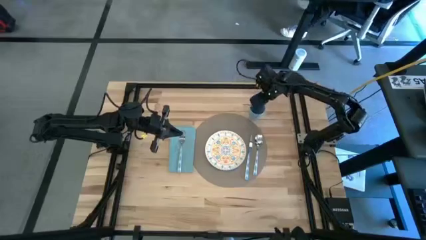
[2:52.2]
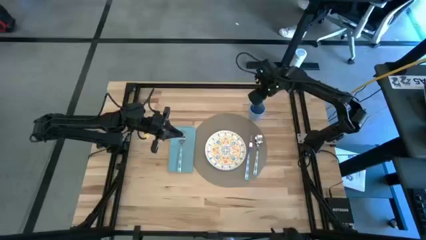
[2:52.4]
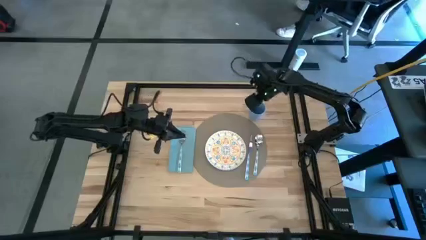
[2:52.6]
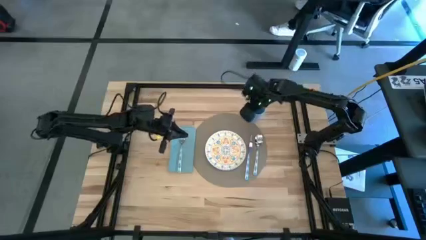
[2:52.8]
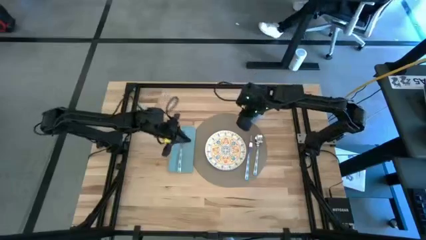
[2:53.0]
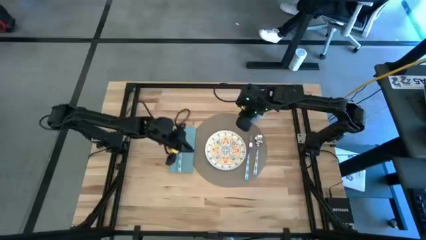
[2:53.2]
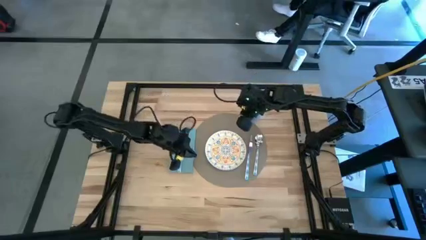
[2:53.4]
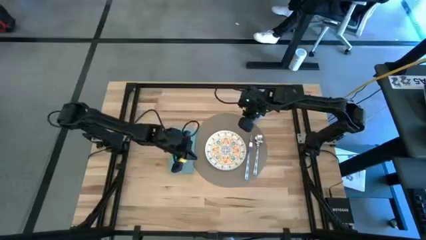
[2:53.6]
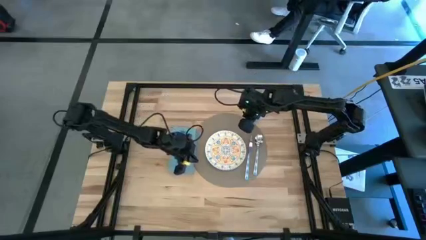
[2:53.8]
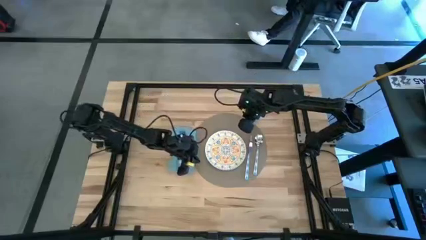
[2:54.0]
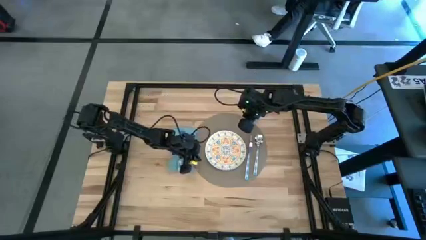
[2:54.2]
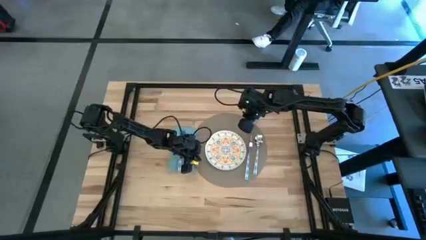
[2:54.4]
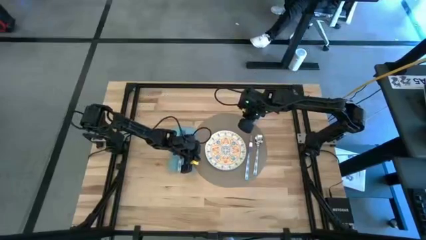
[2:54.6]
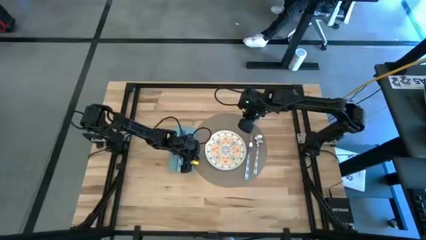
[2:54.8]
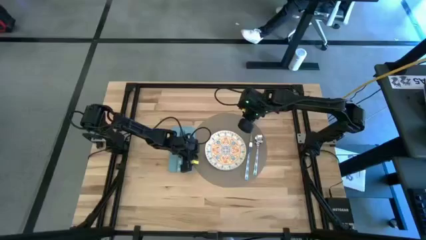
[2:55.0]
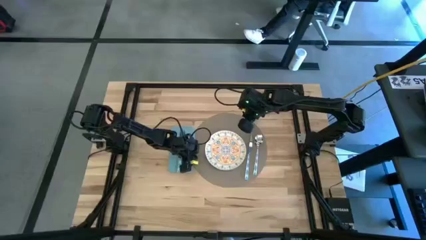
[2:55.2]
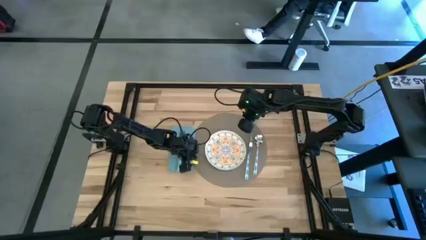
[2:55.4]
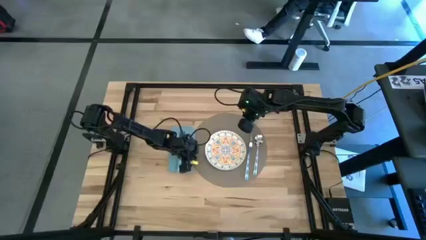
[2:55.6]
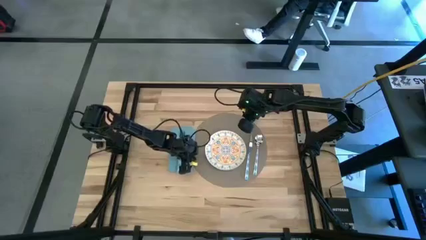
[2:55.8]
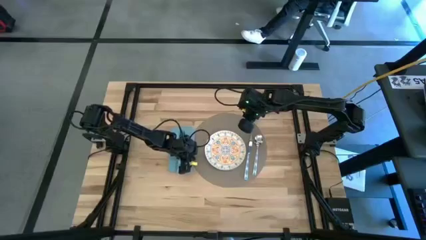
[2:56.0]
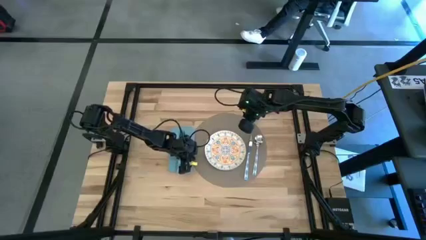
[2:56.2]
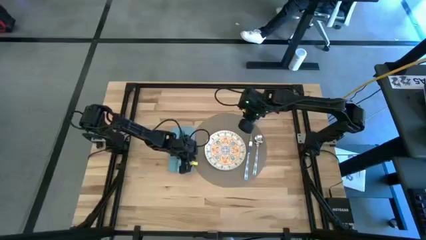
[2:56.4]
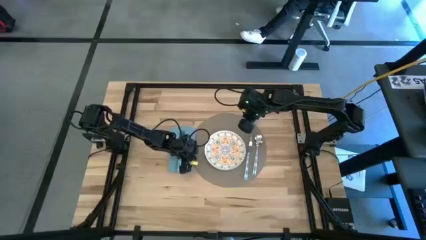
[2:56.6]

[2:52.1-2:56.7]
Task: Set table place
Adjust the brown mat

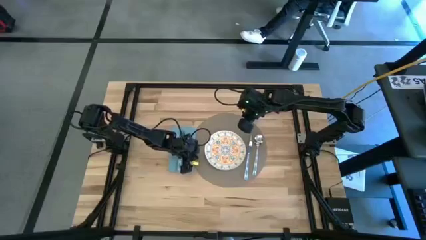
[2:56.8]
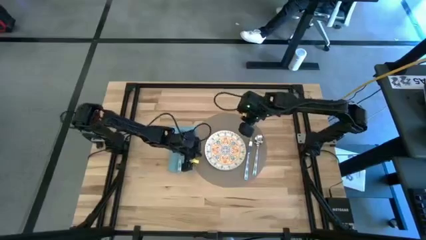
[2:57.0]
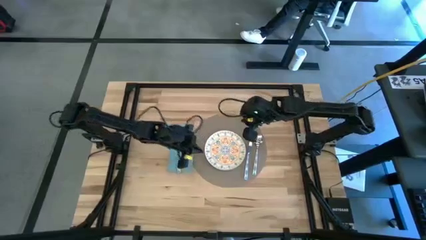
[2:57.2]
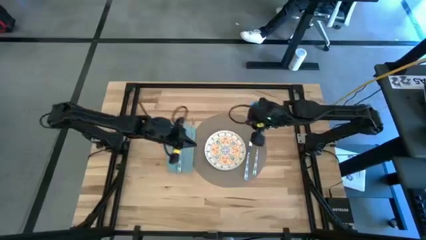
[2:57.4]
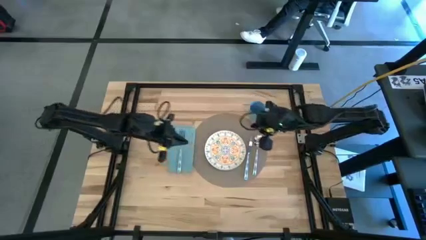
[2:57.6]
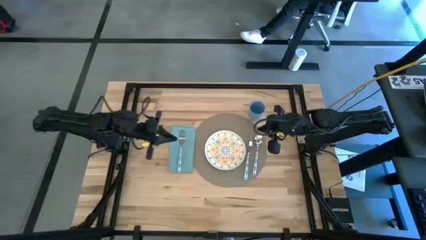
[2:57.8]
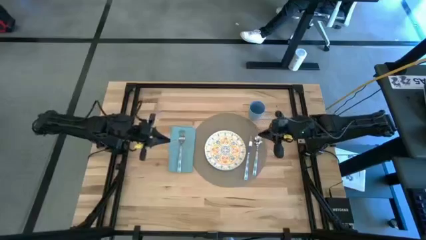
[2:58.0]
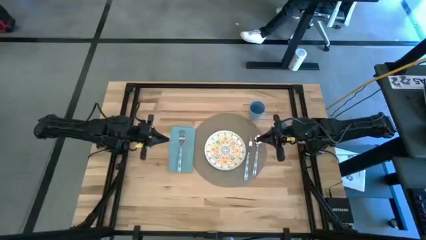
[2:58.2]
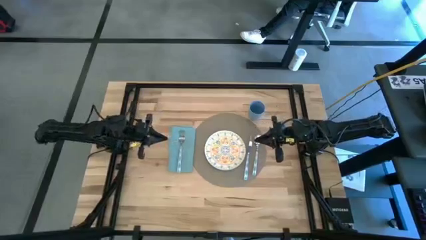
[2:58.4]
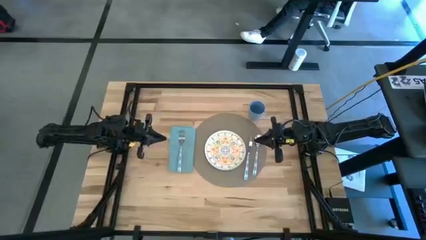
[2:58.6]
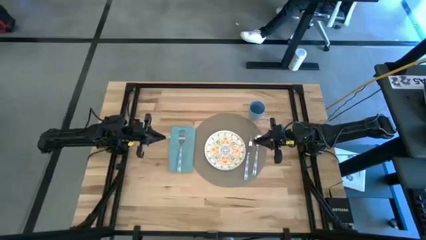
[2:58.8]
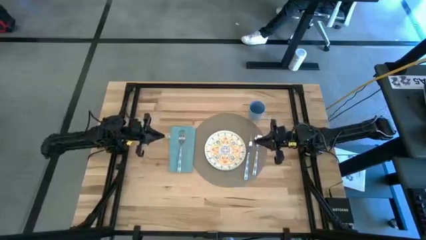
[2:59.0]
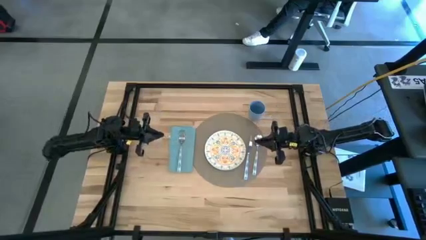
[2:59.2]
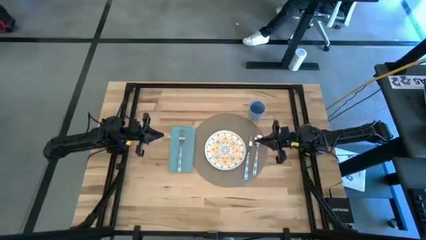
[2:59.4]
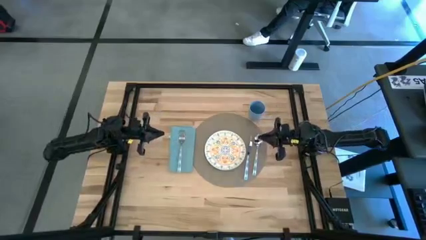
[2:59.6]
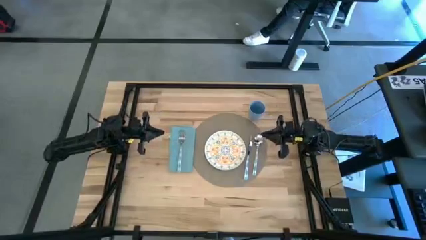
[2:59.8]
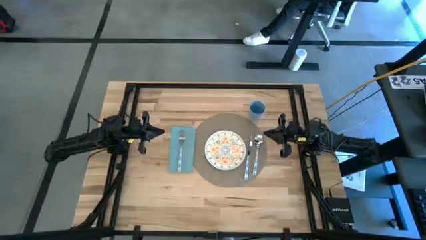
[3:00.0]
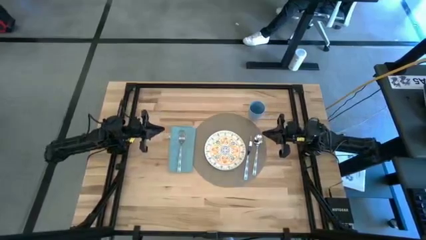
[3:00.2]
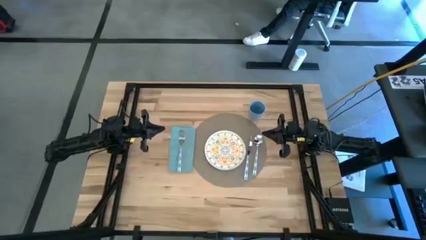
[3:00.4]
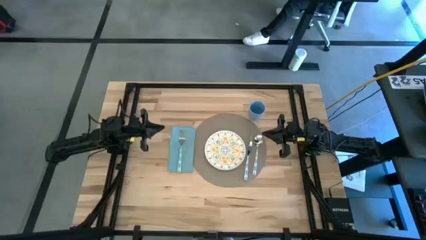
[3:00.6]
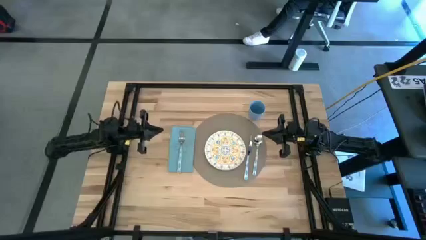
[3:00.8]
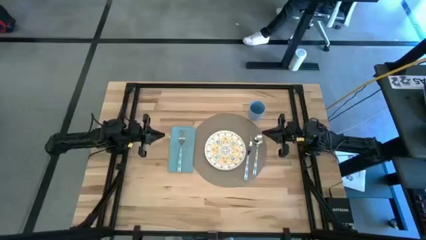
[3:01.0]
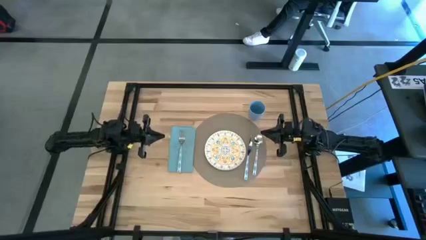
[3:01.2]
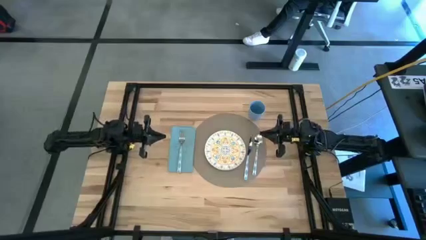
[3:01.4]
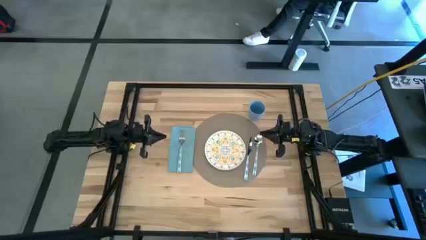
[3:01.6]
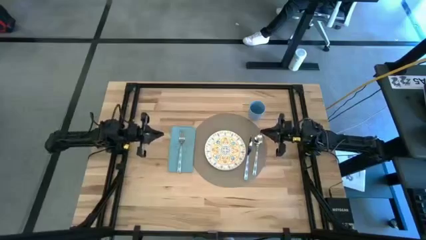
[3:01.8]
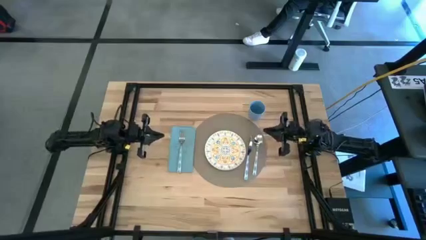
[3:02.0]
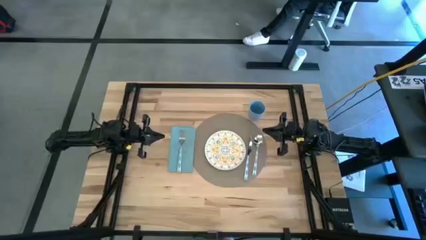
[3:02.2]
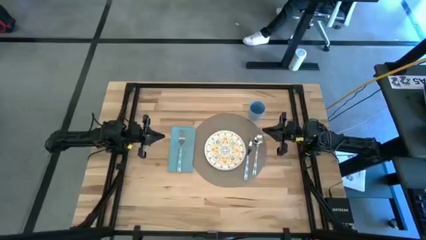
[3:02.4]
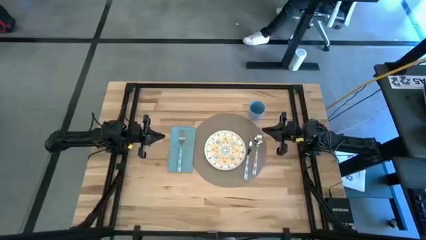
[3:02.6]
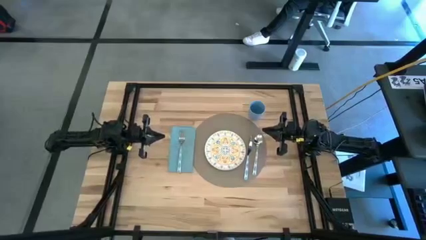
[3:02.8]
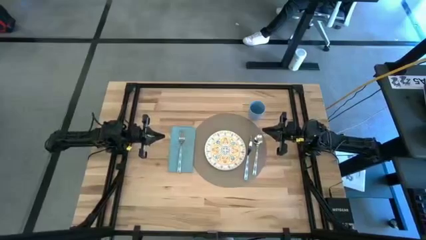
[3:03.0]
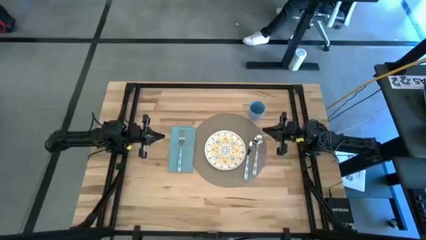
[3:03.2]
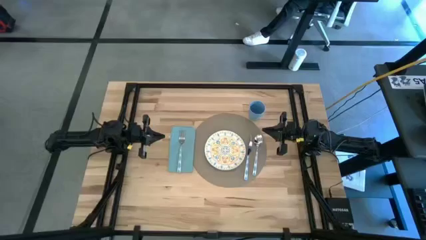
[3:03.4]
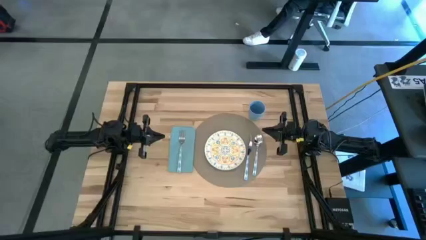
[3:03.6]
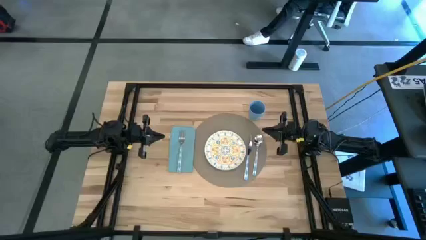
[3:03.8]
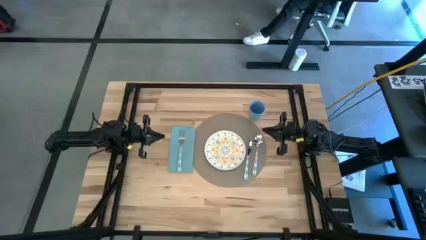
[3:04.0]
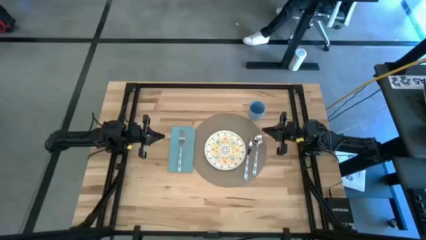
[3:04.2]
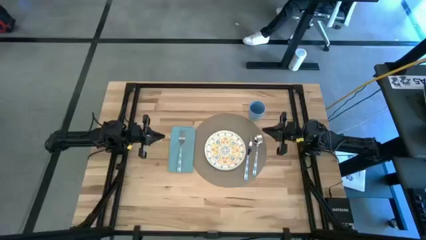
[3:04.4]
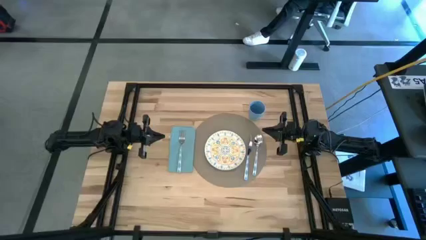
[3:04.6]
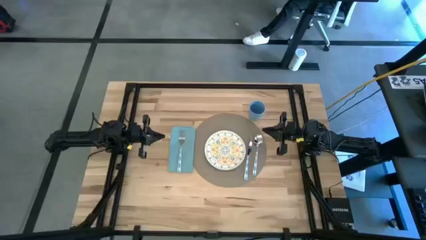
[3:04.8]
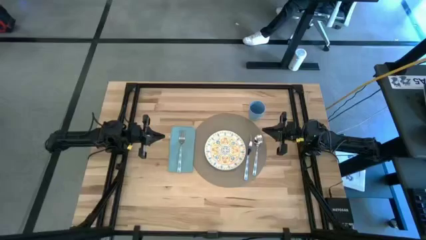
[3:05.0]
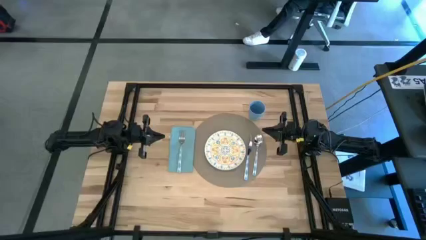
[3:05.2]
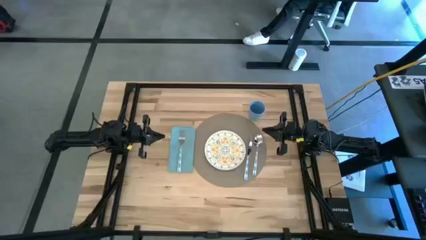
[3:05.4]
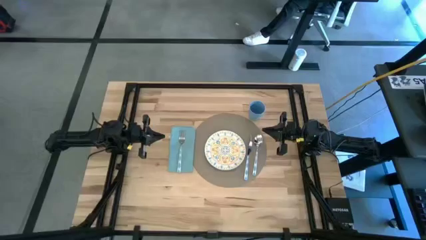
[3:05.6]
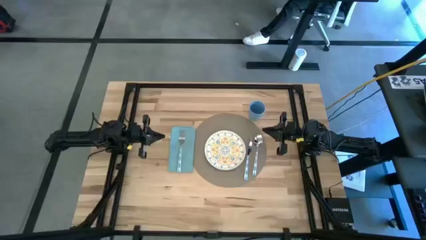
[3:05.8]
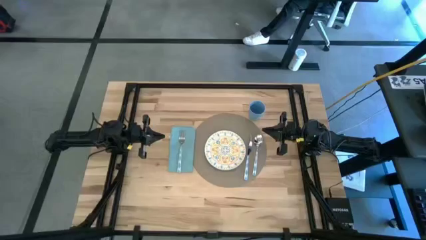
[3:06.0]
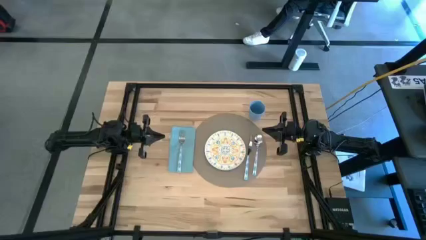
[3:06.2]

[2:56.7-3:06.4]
Return to Home Position
